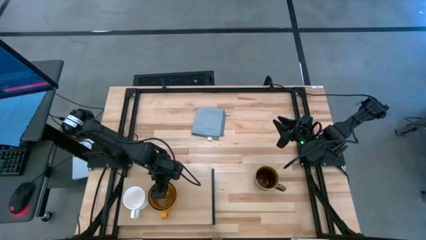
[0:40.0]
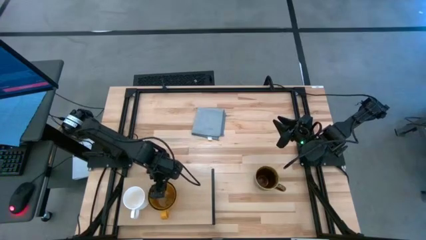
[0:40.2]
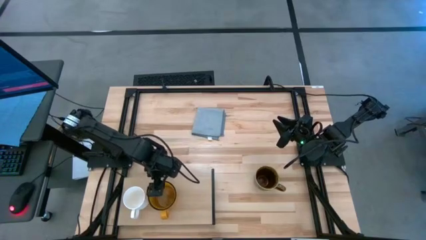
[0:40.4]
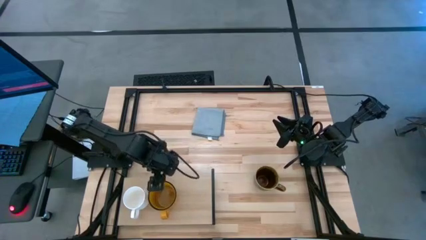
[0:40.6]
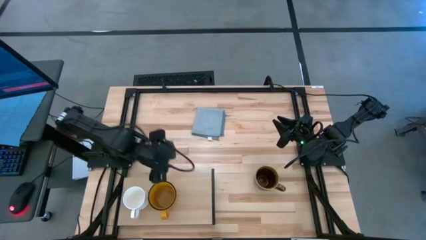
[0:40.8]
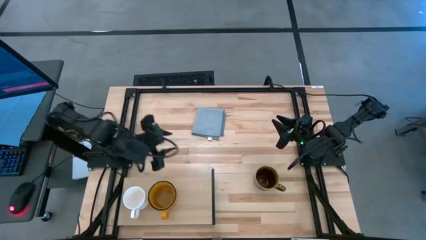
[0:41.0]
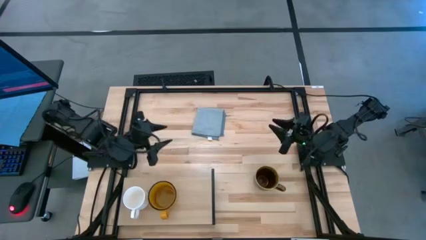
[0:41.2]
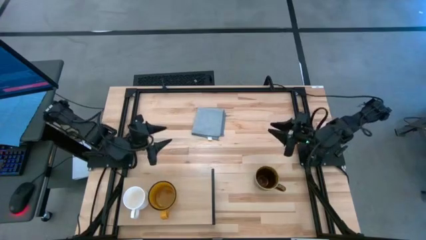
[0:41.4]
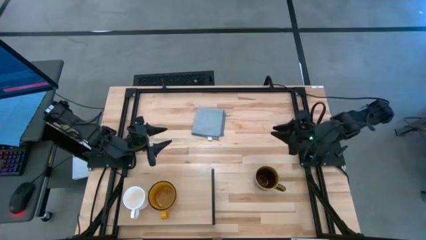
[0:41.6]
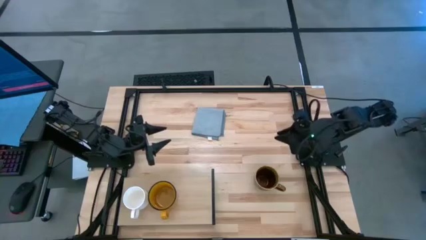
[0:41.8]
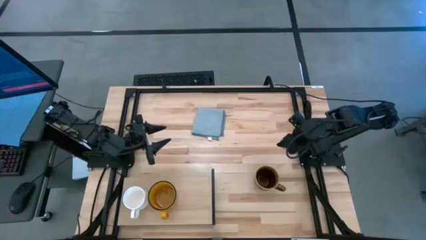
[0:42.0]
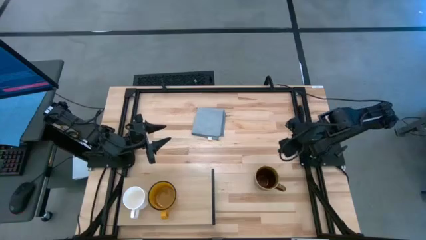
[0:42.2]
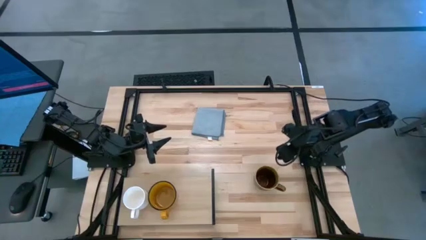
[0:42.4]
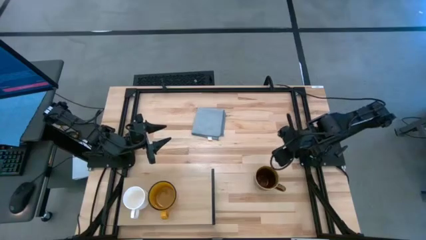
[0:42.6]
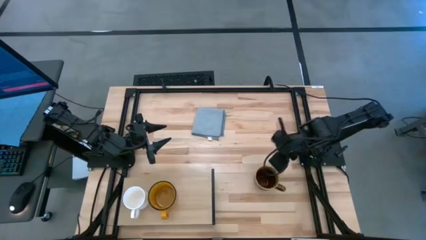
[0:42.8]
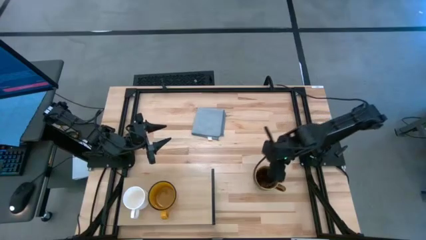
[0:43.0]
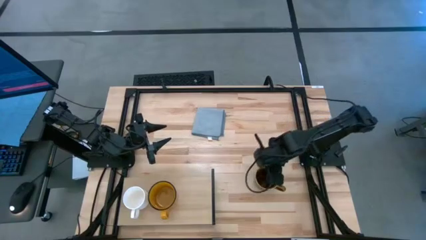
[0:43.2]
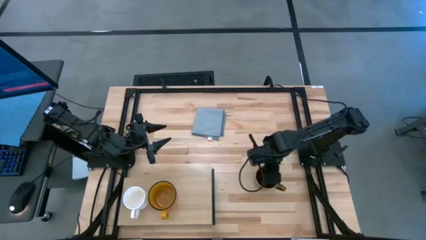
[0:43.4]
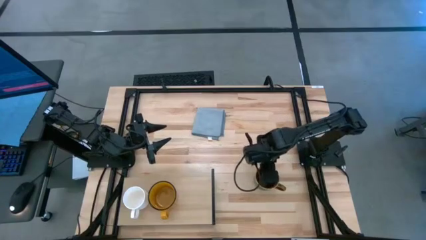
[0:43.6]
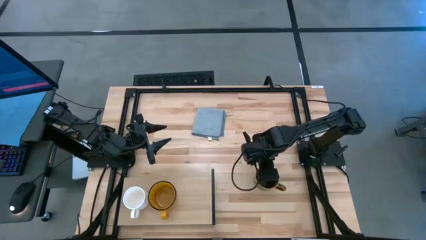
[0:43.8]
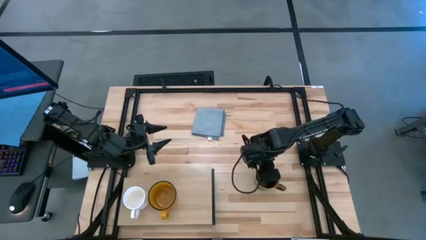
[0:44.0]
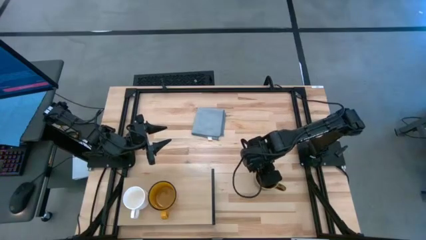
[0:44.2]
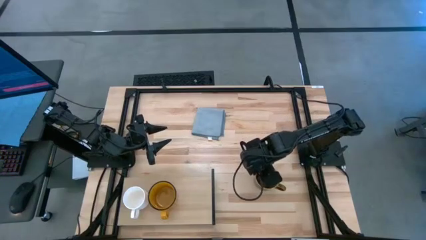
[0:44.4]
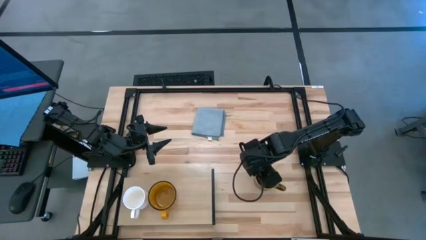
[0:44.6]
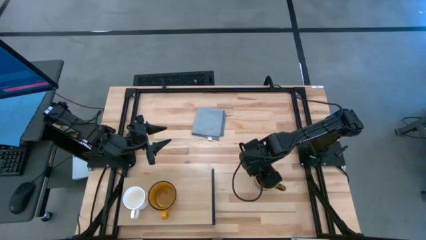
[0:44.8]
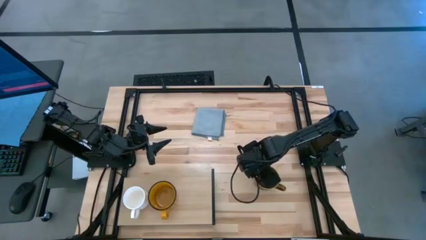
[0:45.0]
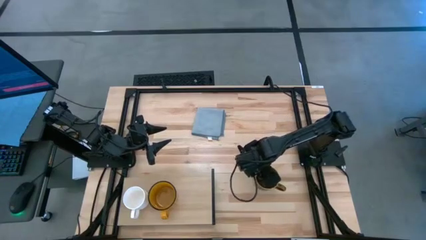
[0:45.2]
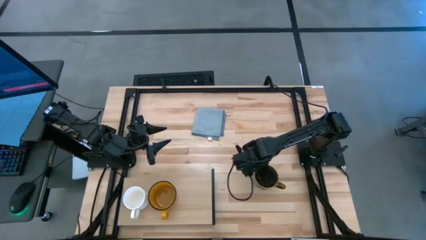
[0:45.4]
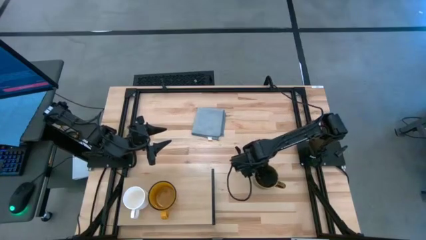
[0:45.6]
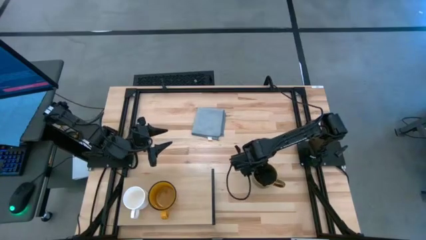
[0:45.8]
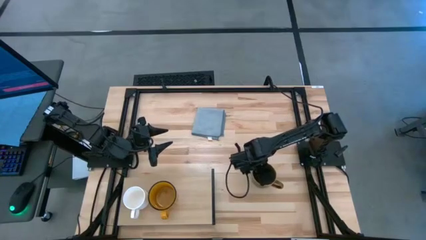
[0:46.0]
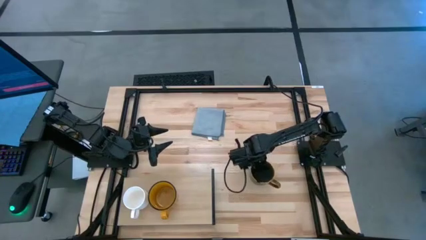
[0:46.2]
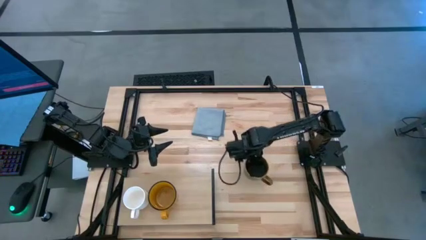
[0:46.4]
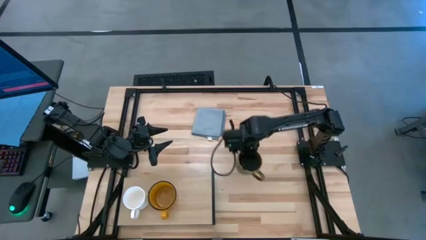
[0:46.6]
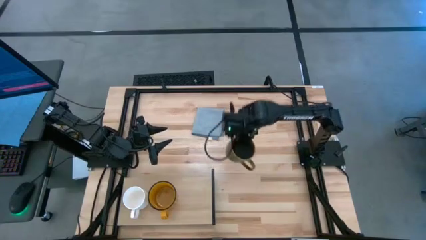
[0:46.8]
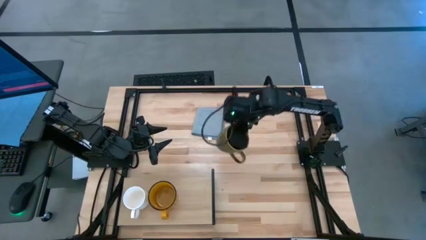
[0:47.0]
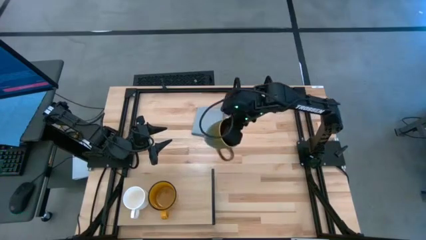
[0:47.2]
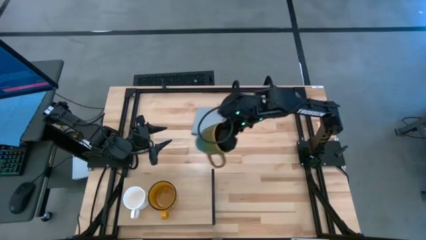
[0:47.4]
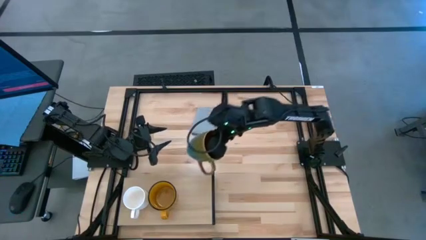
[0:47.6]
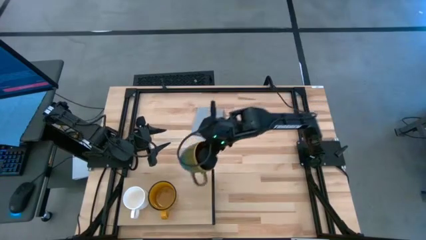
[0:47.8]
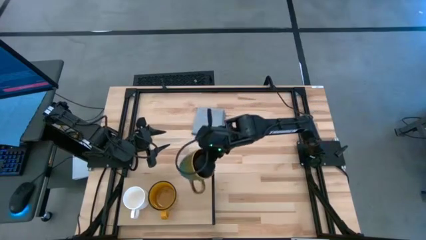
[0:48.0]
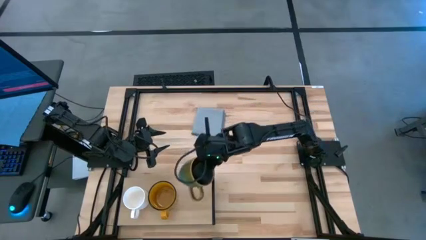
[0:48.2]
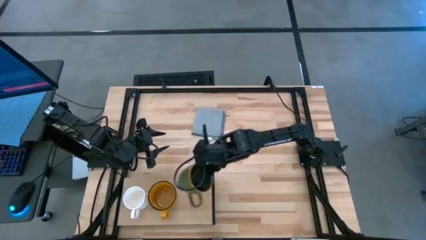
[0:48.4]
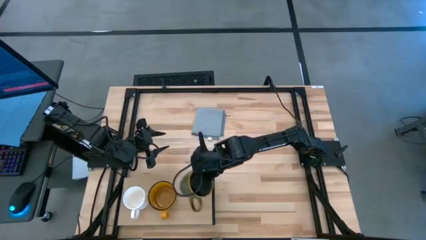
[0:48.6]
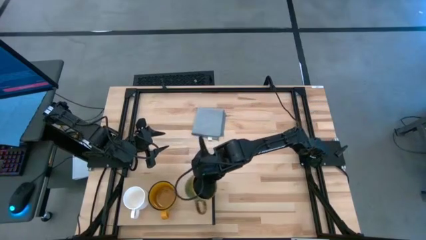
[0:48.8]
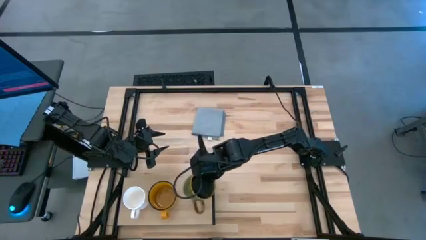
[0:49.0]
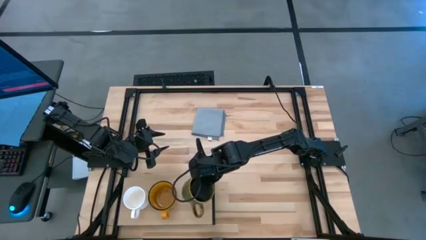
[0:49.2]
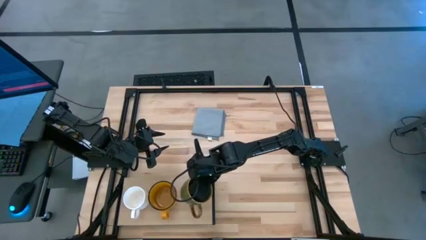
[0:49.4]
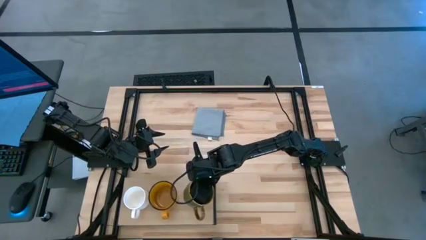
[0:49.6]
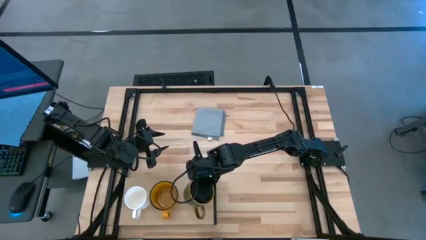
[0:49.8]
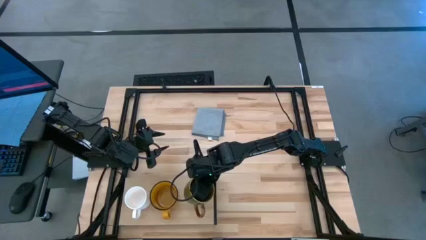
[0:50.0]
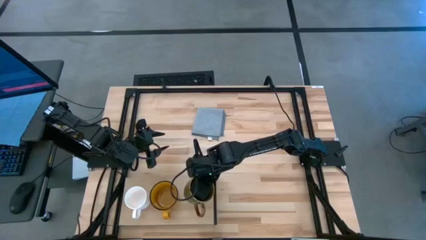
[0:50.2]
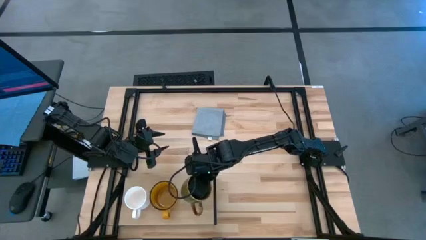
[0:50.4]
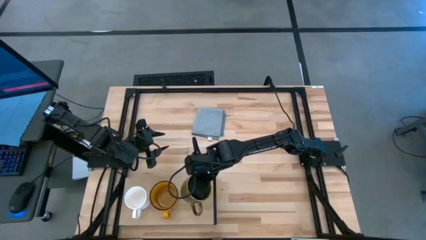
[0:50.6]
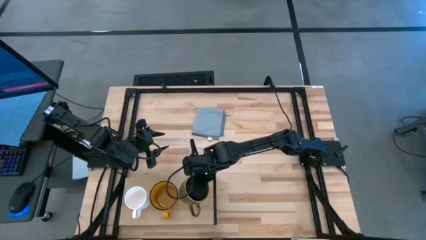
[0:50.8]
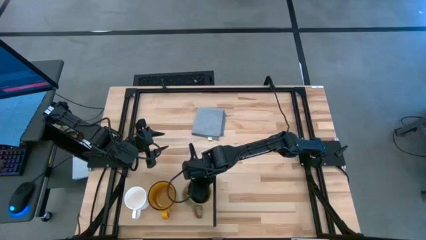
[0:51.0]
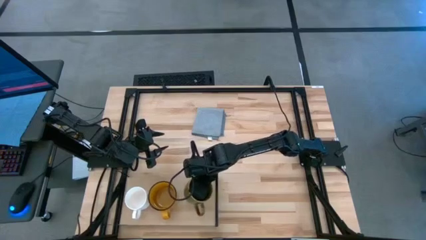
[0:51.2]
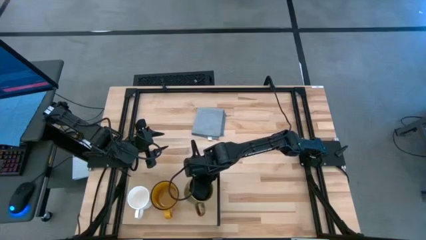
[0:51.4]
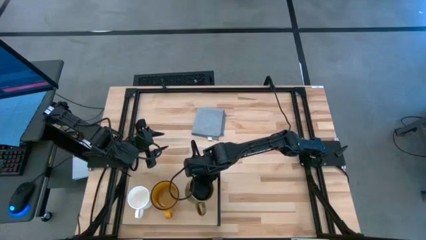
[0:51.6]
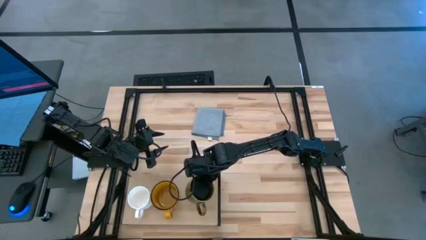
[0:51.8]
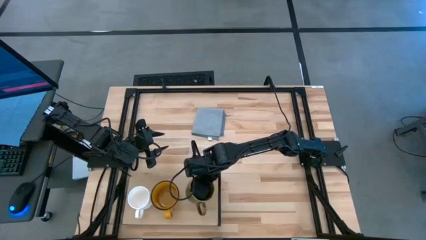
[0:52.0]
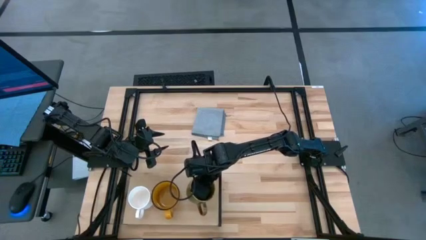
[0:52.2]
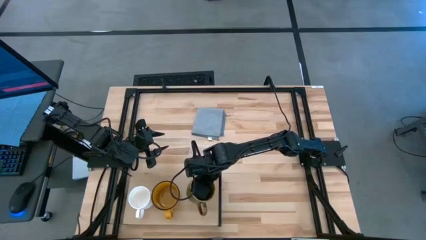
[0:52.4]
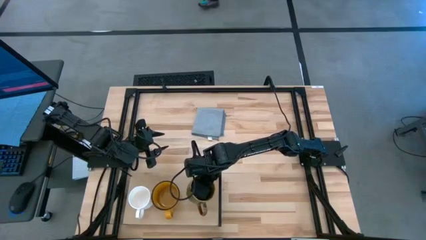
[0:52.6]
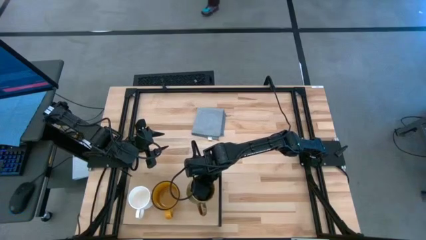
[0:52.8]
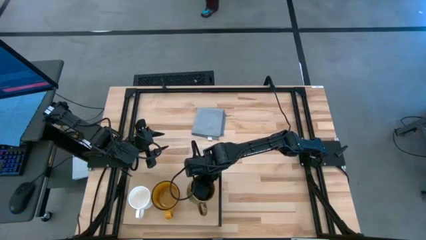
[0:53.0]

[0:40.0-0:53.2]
Task: Stack small to large cups/mugs on shelf
Put the green patterned mug on the shelf

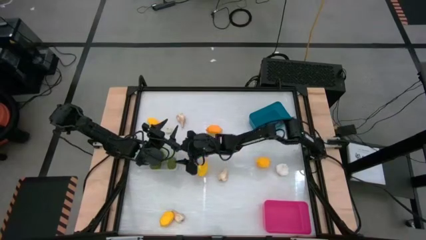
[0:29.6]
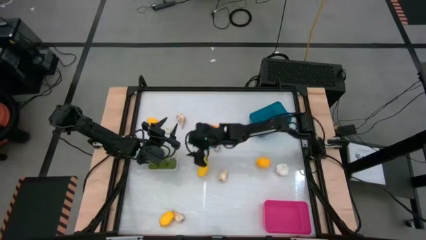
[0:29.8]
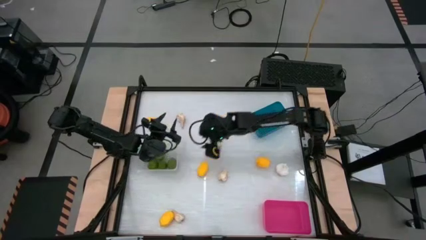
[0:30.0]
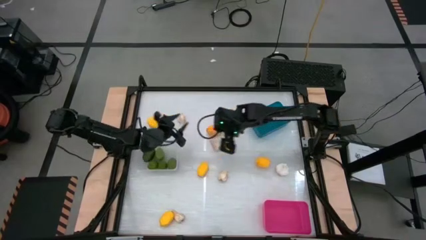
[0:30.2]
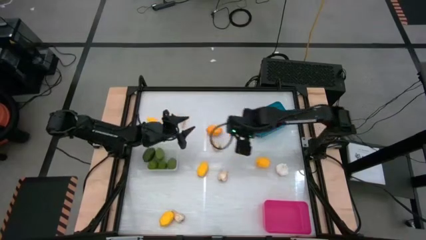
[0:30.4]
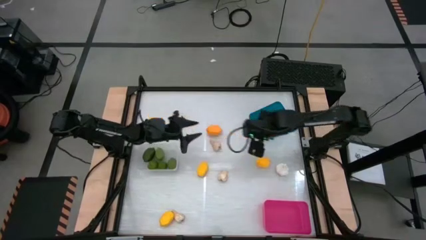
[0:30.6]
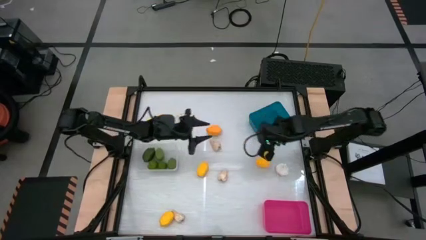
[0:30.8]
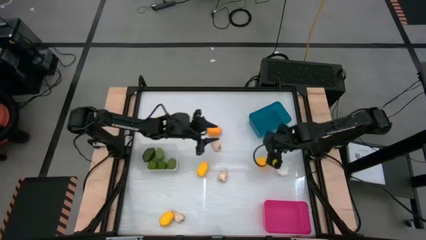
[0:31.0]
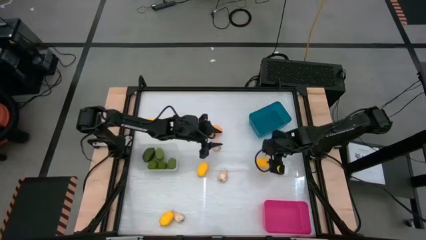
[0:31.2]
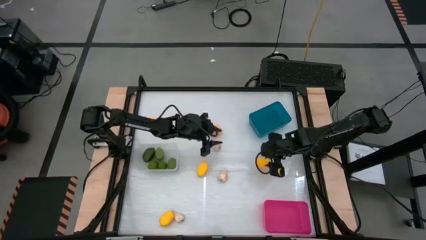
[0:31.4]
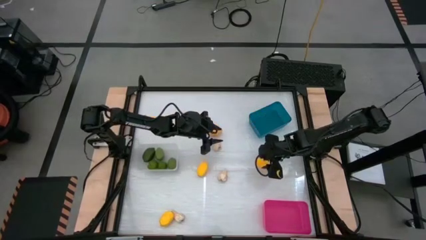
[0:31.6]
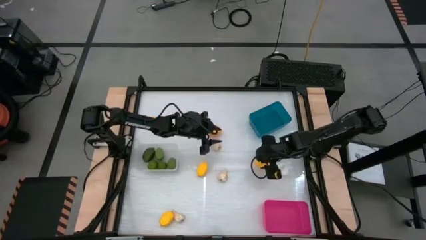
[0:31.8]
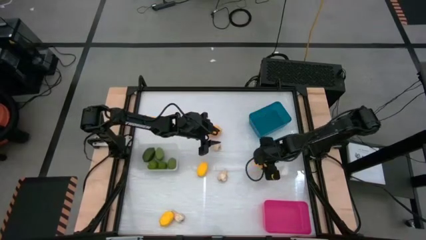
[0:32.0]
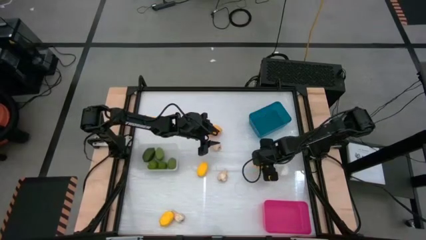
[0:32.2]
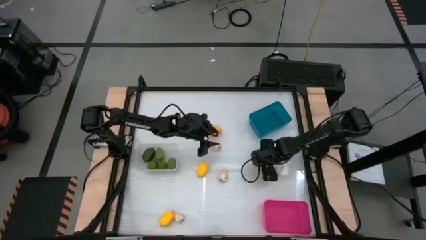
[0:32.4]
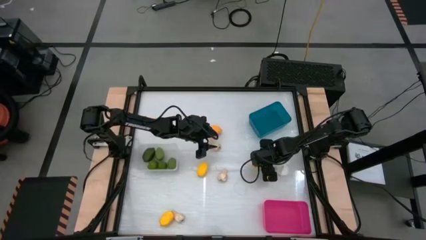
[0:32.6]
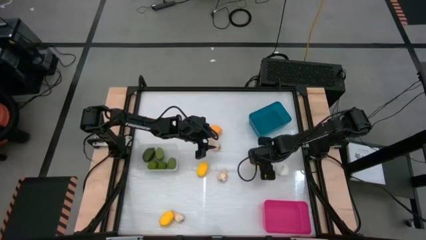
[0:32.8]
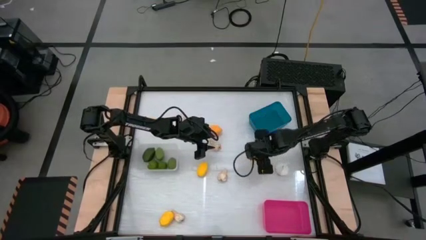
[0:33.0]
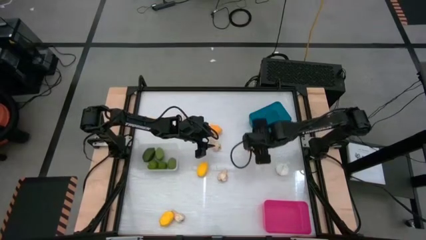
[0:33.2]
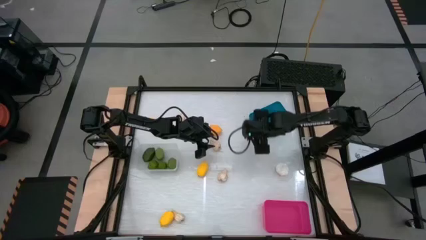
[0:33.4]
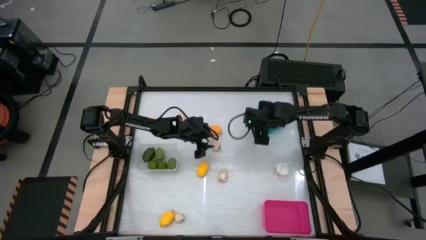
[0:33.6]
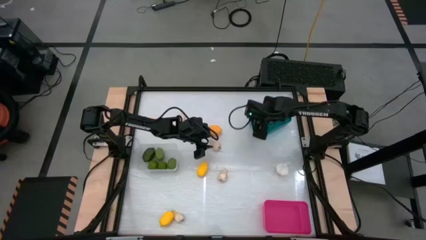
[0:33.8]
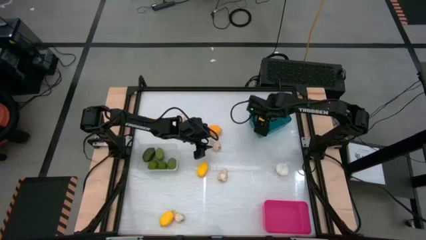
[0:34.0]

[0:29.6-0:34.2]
Task: Sort produce into baskets
Put the yellow lemon into the blue bin
